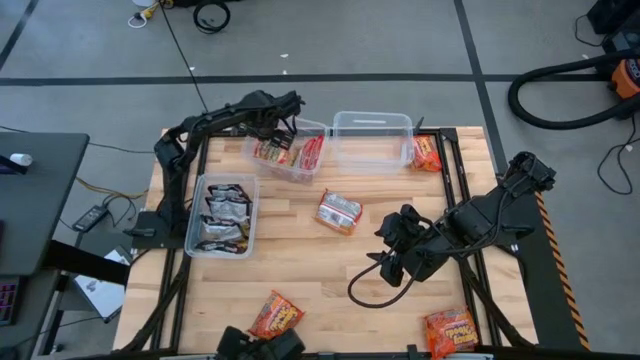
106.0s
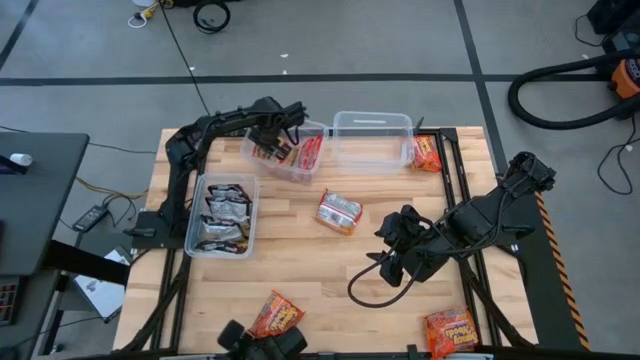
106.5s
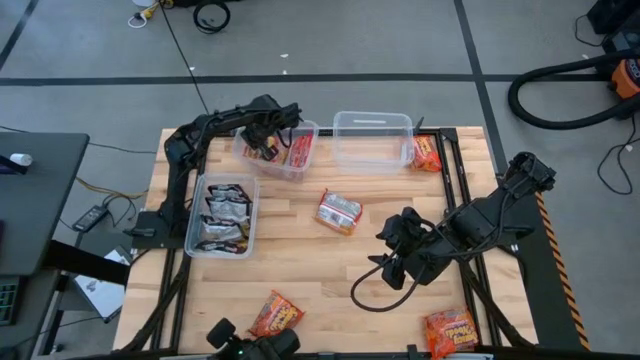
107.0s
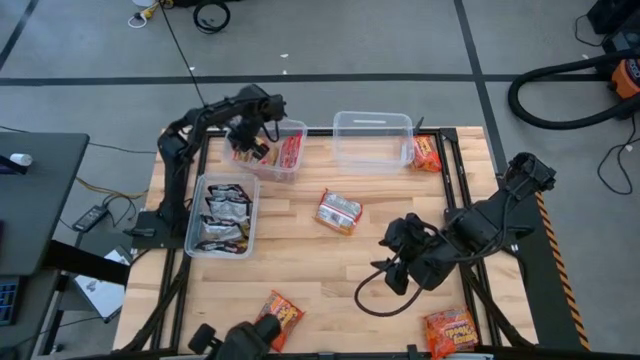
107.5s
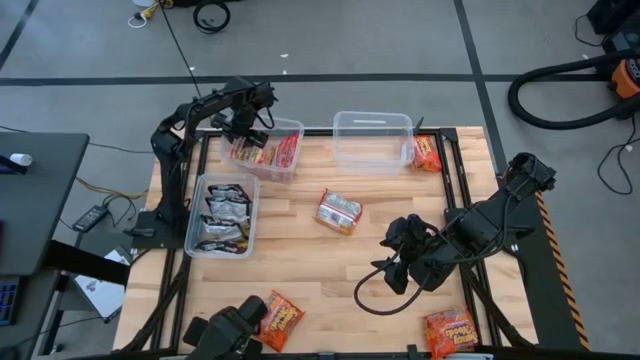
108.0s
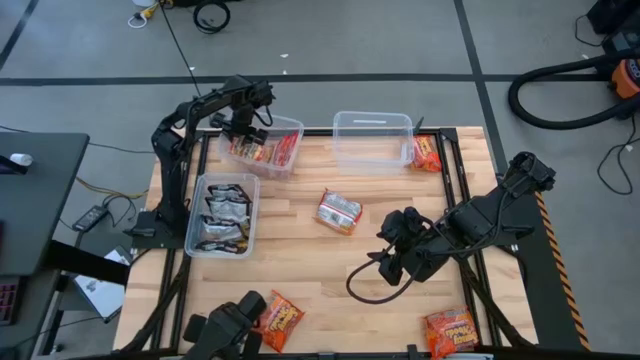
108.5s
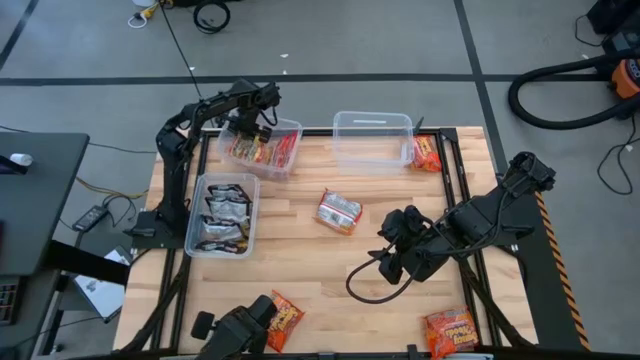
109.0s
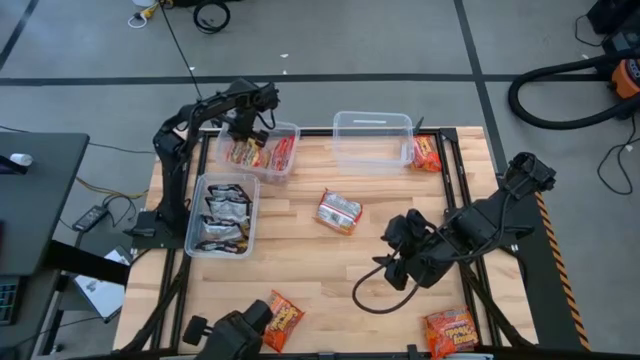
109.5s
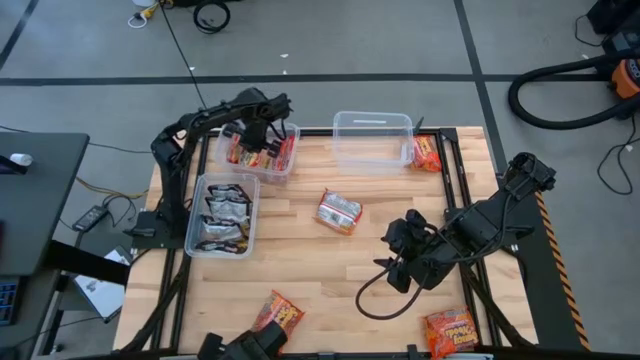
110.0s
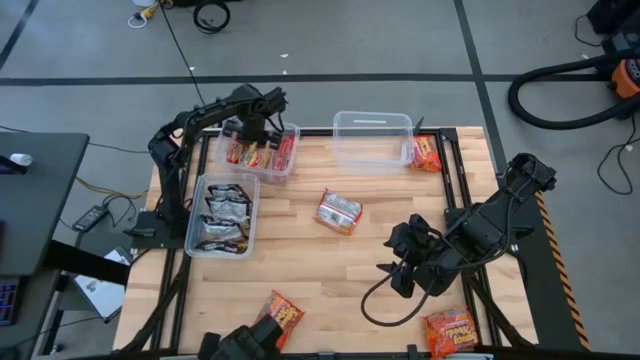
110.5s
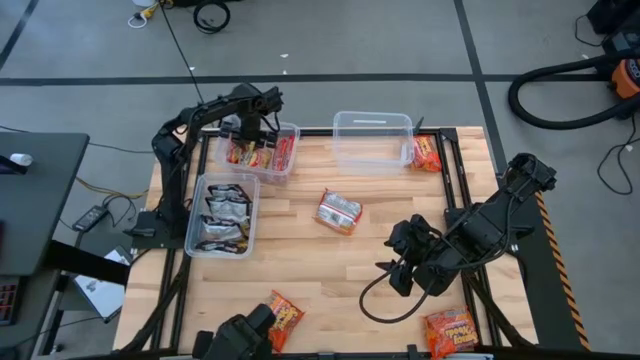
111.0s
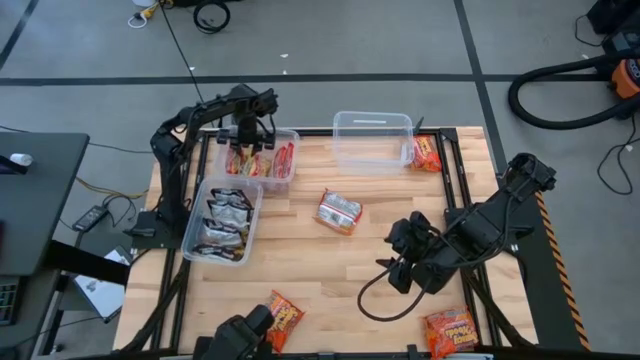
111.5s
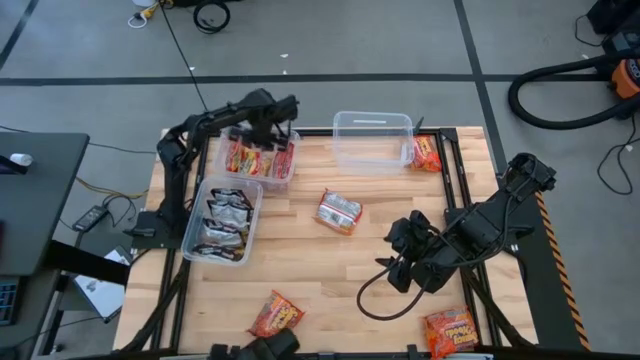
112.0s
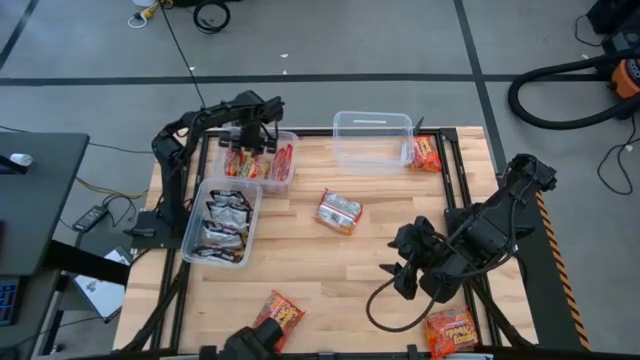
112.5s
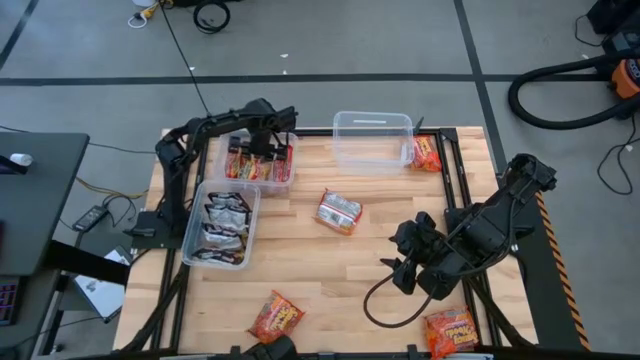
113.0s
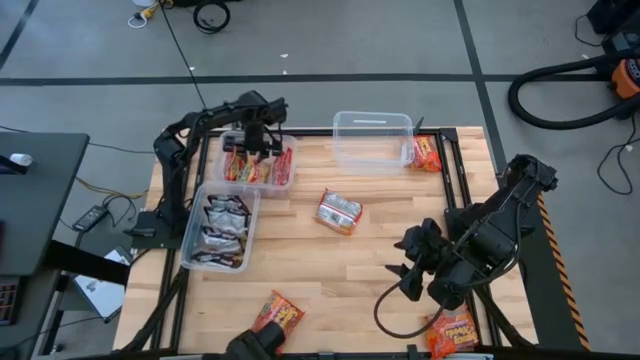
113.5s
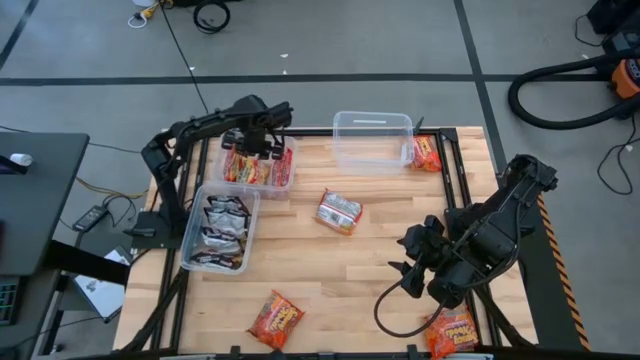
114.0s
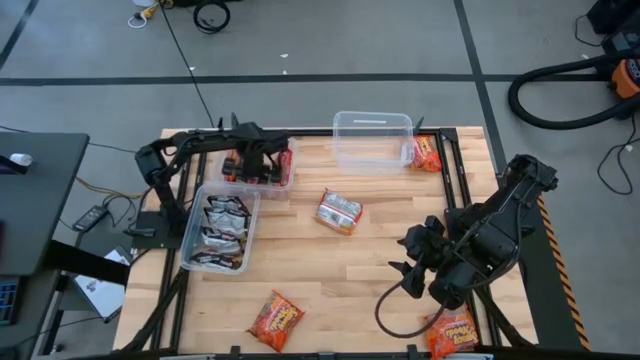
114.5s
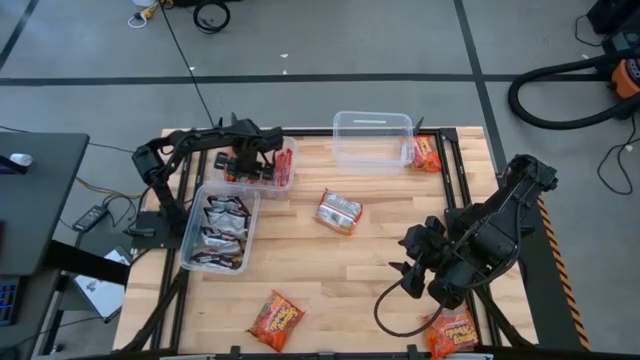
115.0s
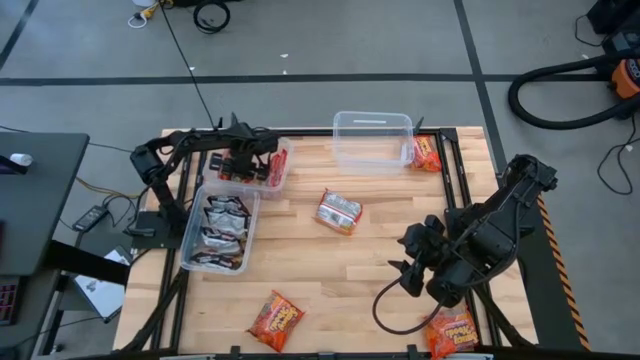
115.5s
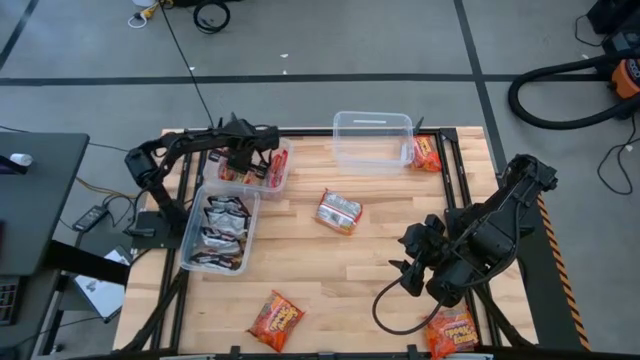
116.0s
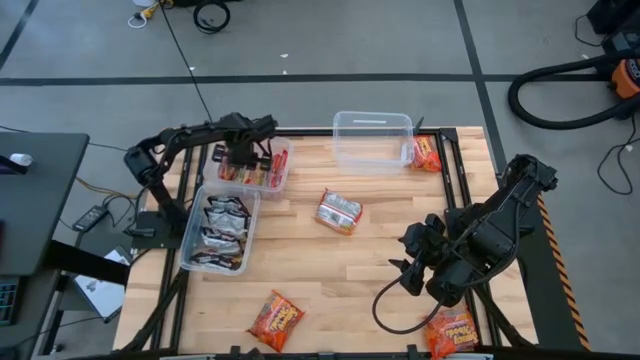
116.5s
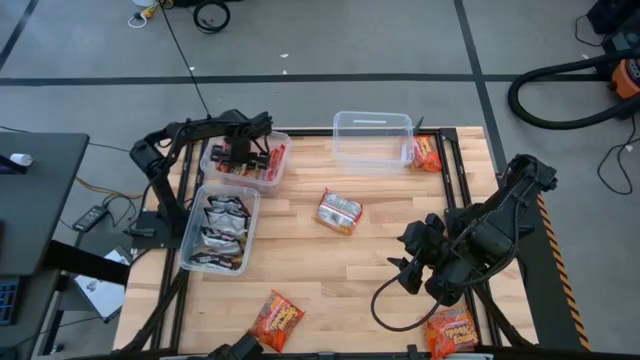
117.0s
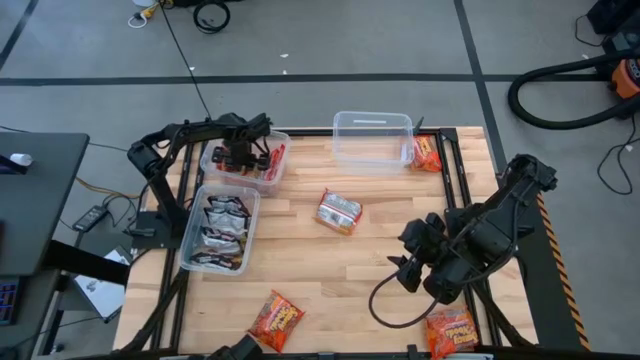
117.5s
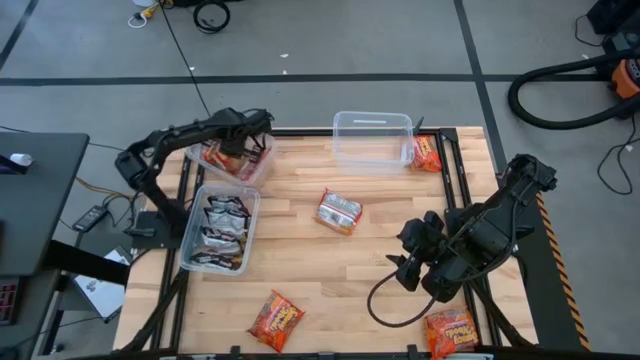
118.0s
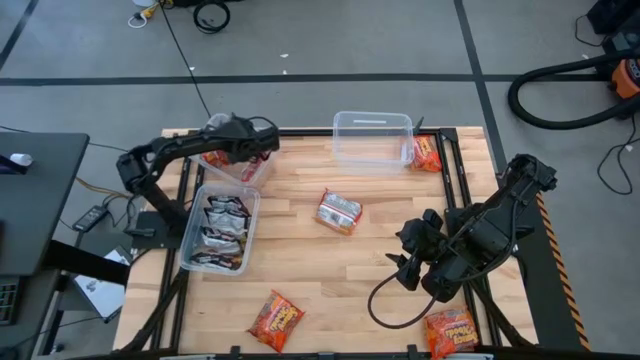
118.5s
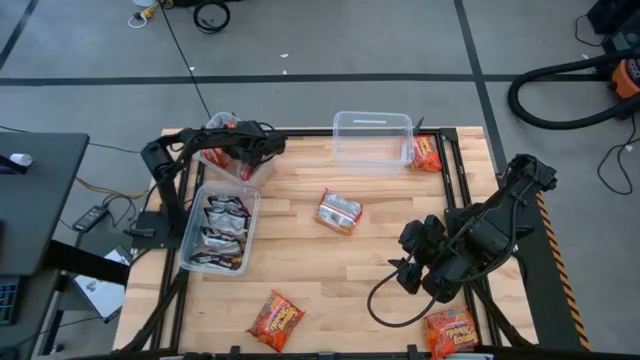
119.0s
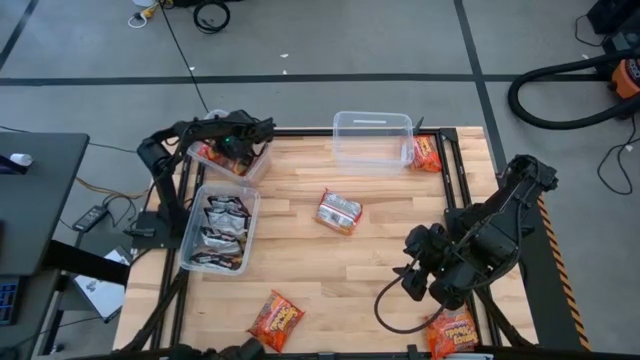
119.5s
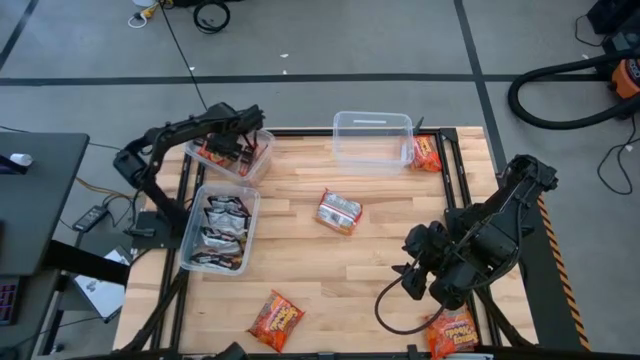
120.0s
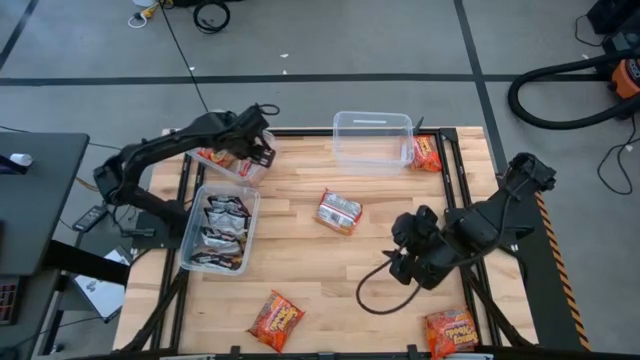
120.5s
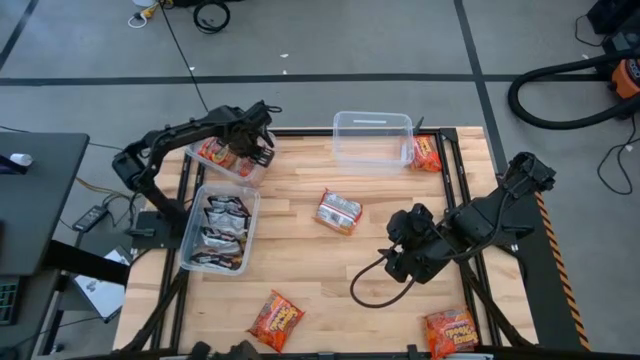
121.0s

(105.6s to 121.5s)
Task: Sort Maruchan noodles
Adjust the orange noodle pack from transparent bin

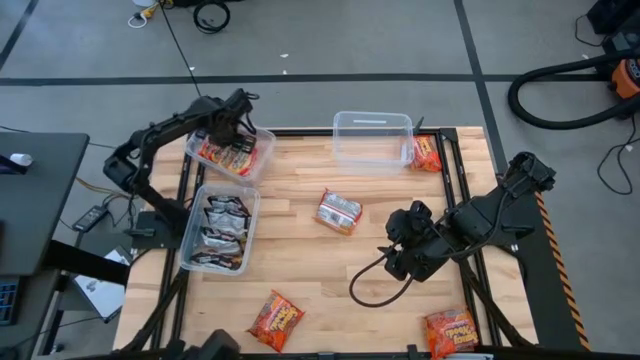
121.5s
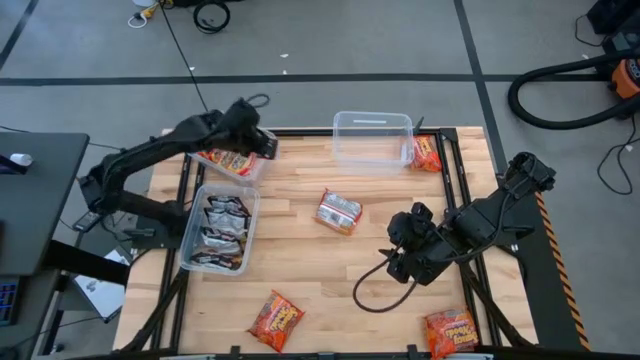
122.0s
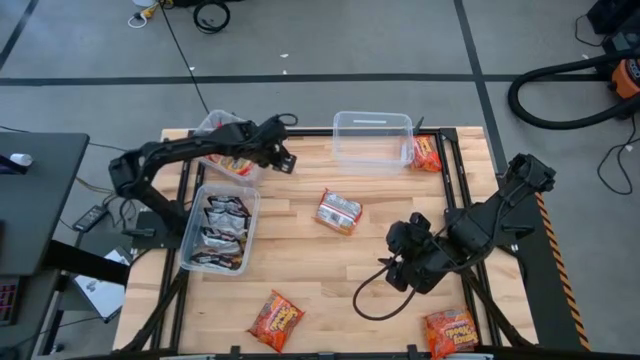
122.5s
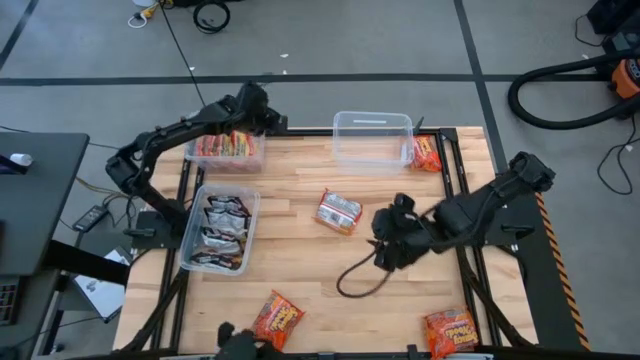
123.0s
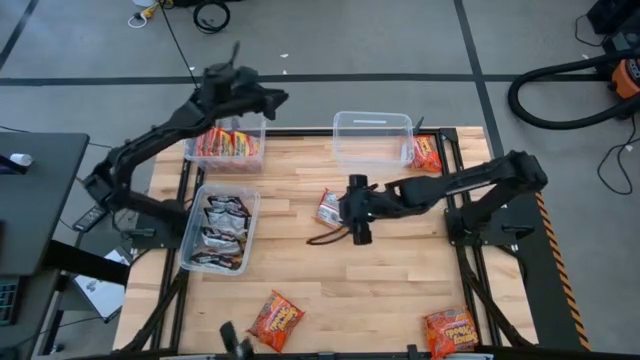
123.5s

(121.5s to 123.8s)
Adjust the top left transparent bin

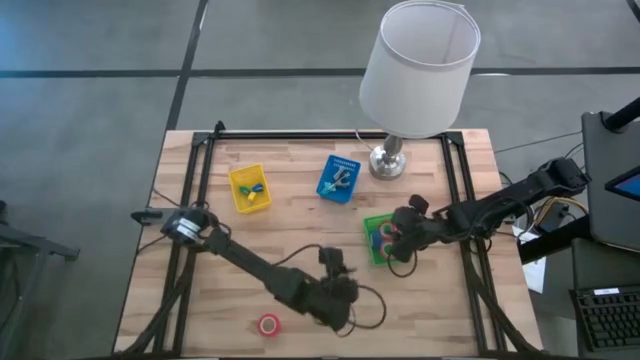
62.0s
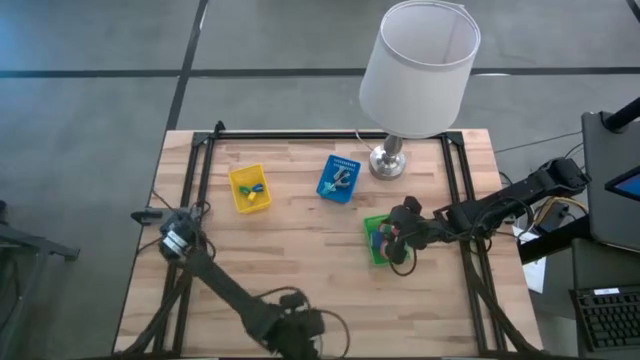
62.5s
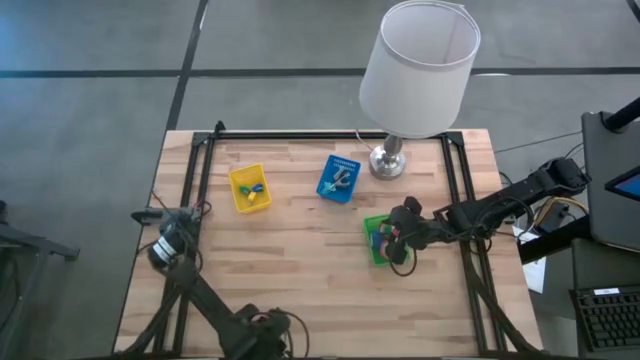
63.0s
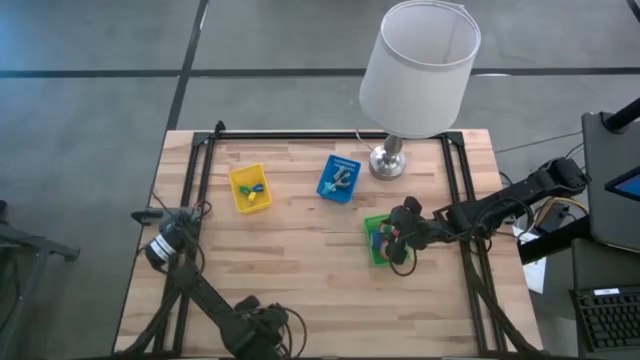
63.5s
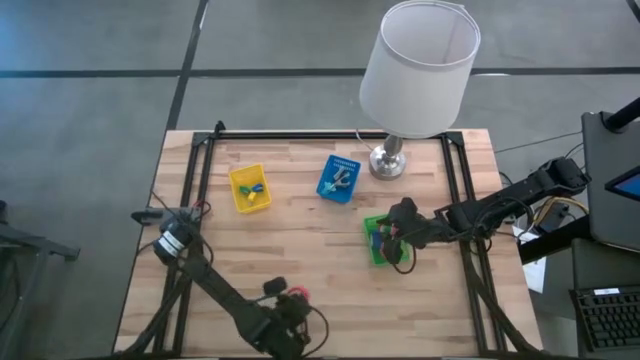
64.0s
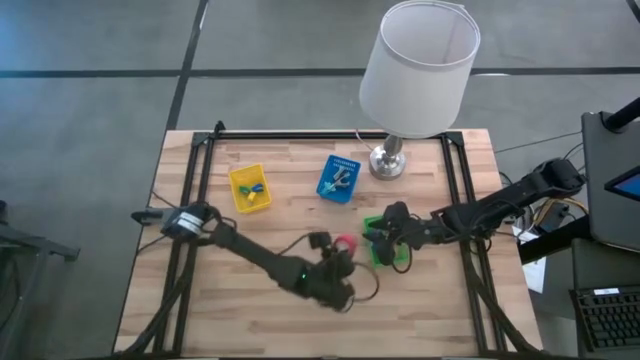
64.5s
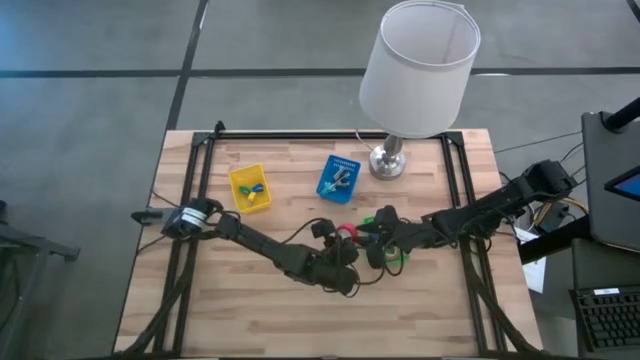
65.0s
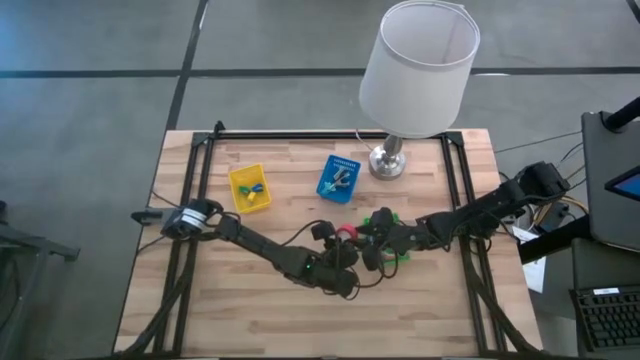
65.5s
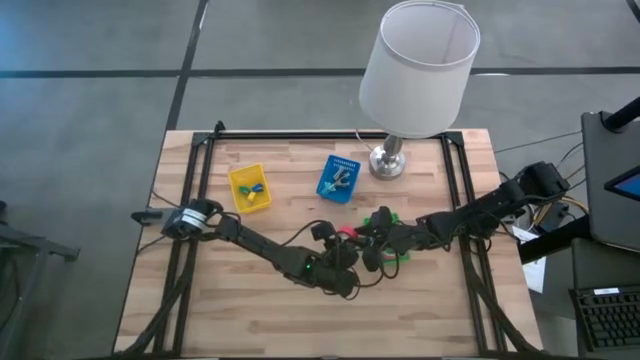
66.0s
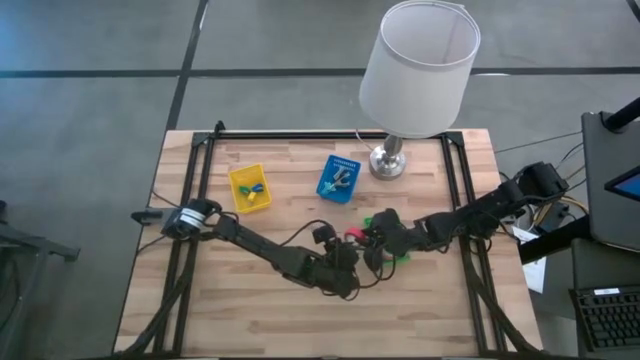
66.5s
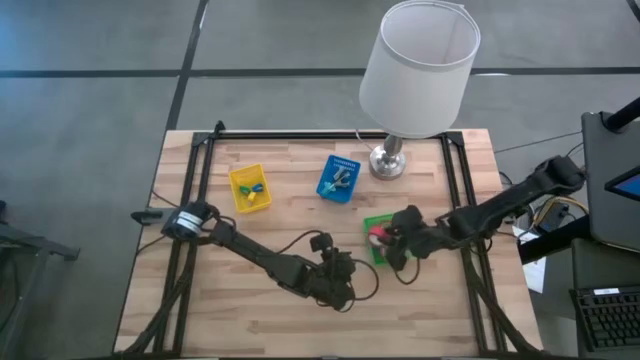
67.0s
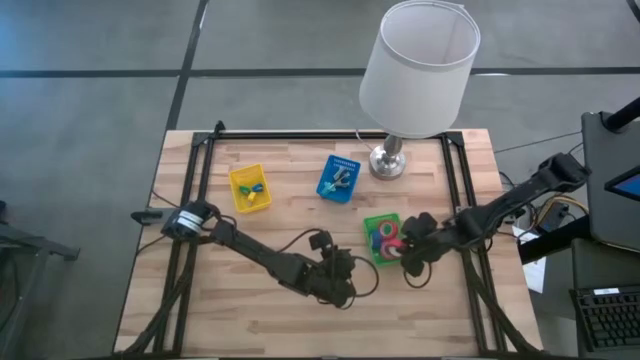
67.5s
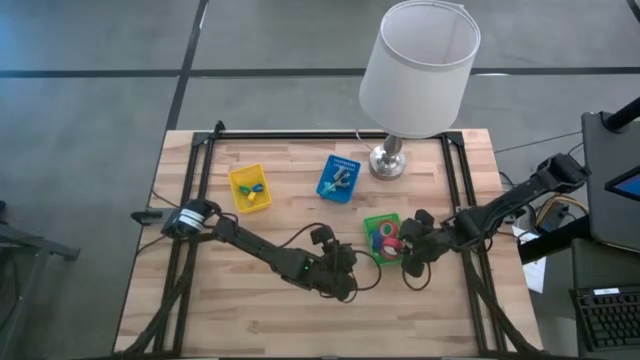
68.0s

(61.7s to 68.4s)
Task: Pick and place Stapler, Stapler remover, tape
Put the red tape into the green basket
